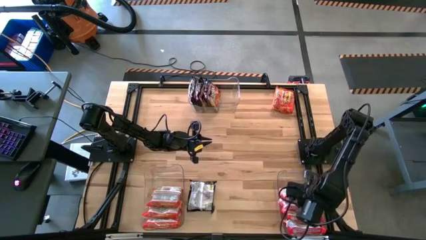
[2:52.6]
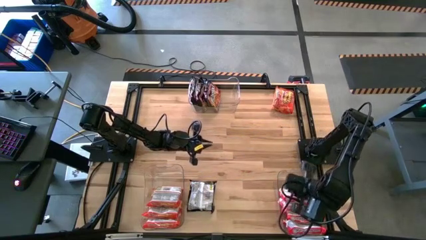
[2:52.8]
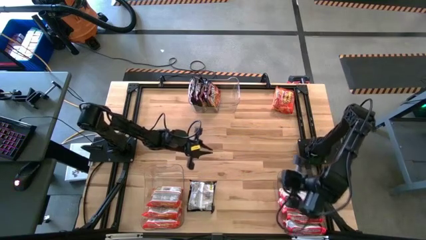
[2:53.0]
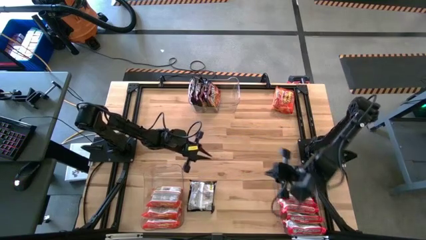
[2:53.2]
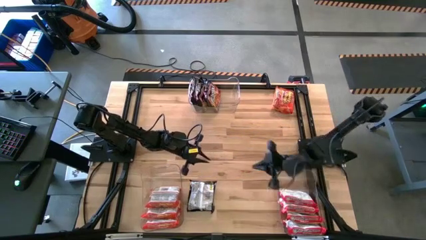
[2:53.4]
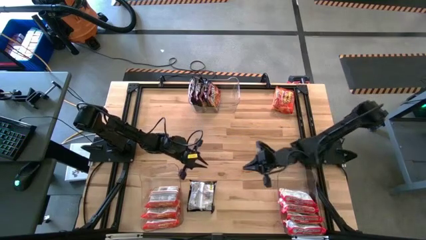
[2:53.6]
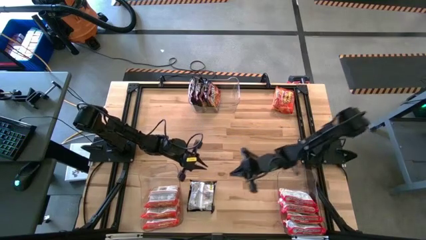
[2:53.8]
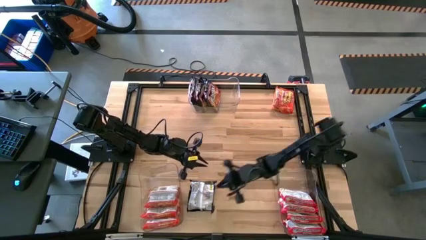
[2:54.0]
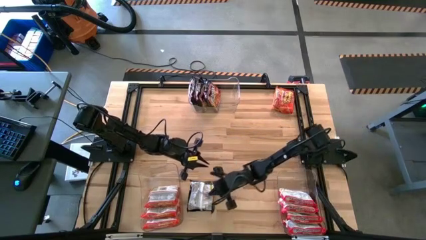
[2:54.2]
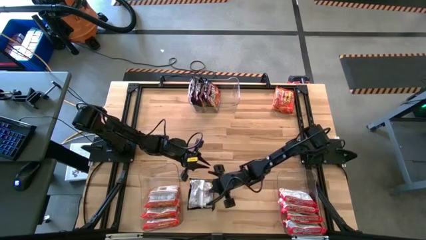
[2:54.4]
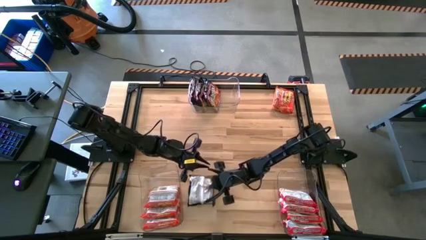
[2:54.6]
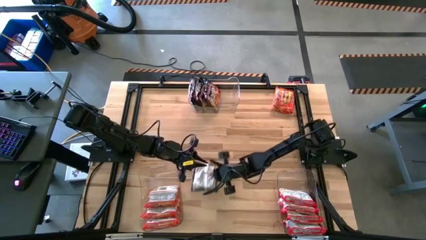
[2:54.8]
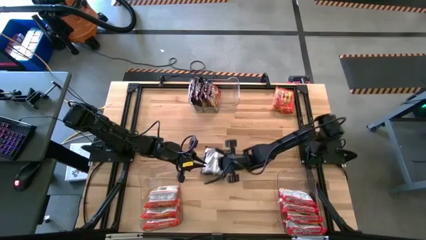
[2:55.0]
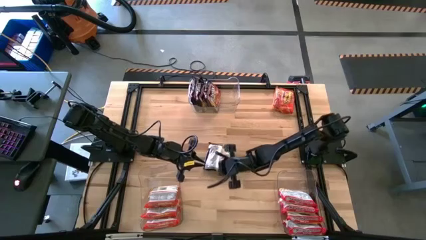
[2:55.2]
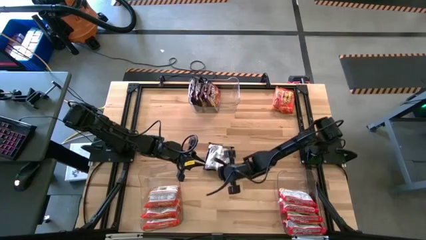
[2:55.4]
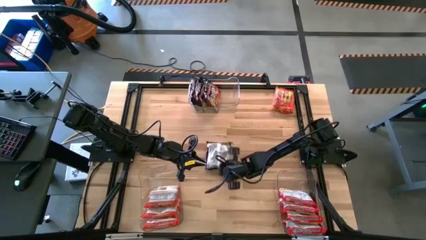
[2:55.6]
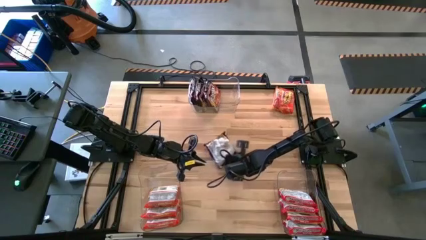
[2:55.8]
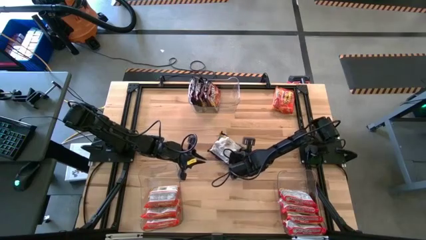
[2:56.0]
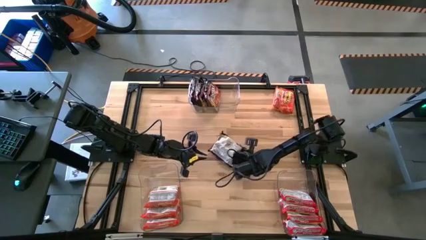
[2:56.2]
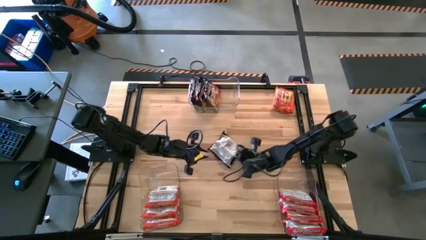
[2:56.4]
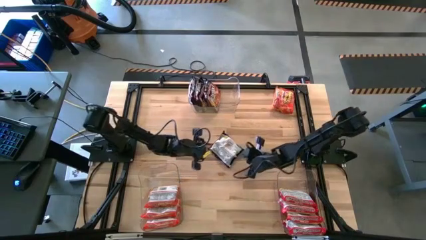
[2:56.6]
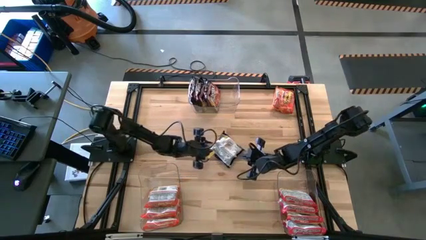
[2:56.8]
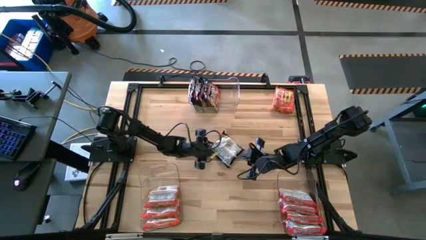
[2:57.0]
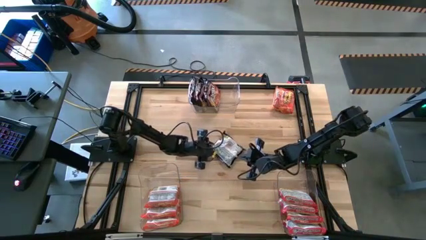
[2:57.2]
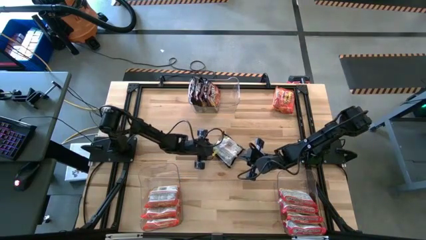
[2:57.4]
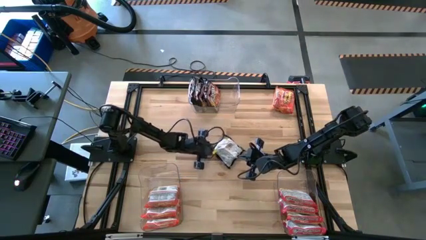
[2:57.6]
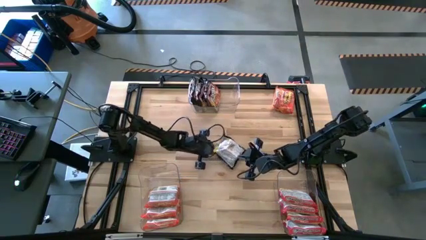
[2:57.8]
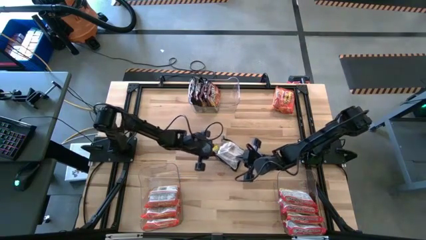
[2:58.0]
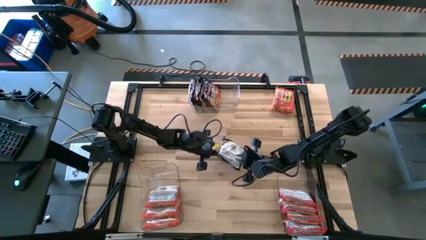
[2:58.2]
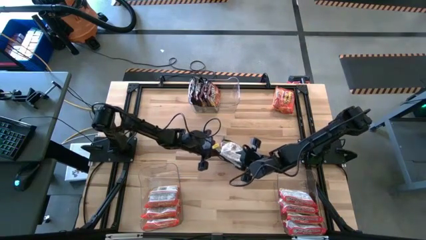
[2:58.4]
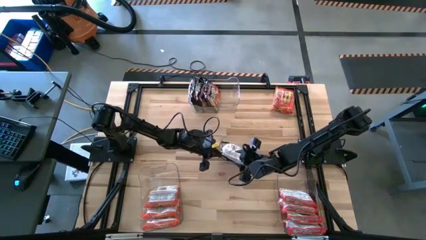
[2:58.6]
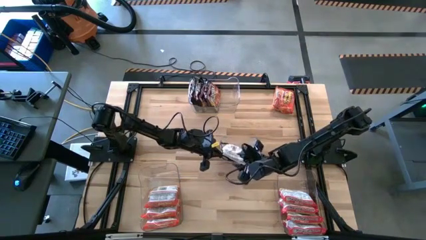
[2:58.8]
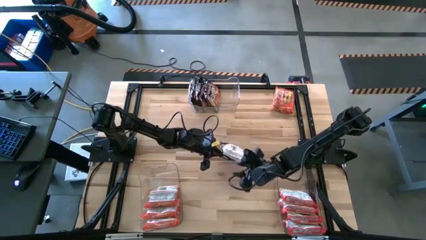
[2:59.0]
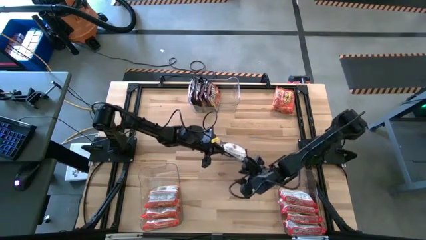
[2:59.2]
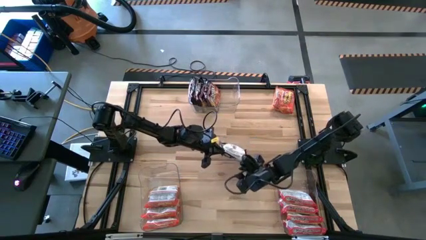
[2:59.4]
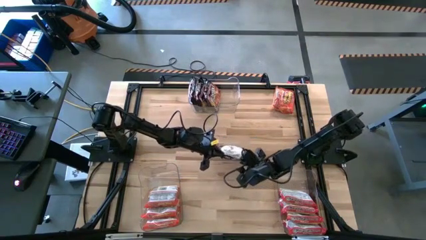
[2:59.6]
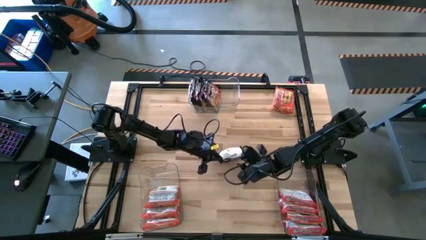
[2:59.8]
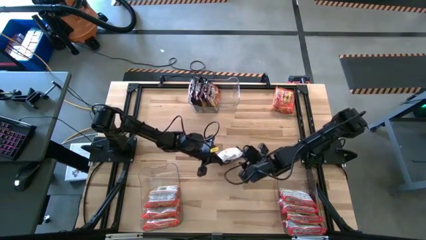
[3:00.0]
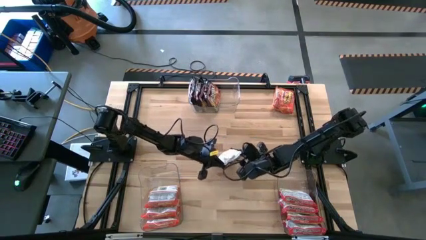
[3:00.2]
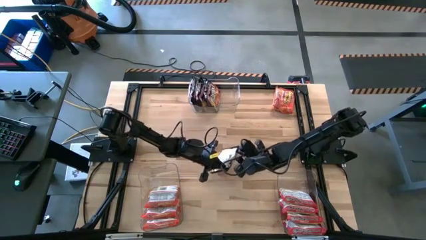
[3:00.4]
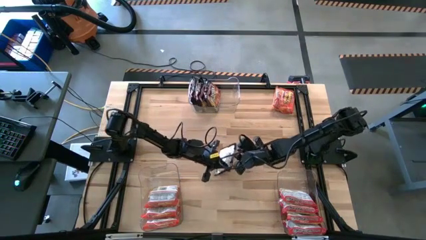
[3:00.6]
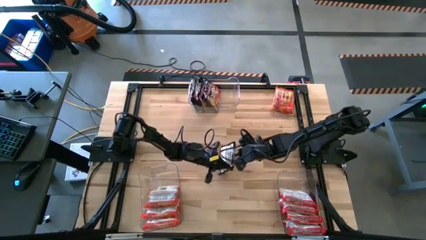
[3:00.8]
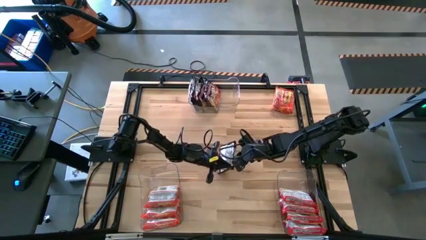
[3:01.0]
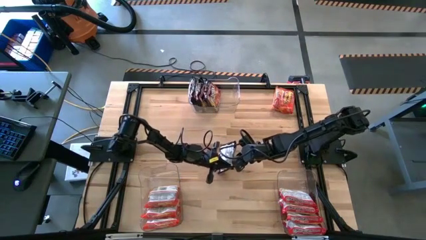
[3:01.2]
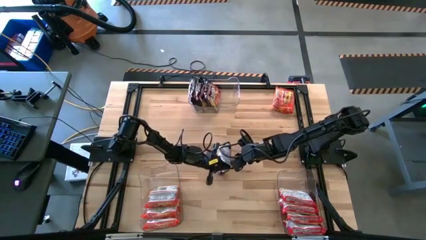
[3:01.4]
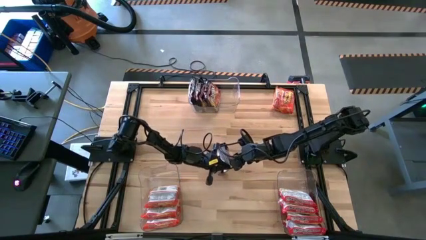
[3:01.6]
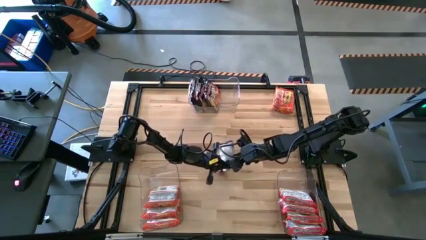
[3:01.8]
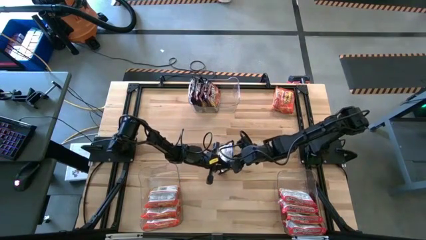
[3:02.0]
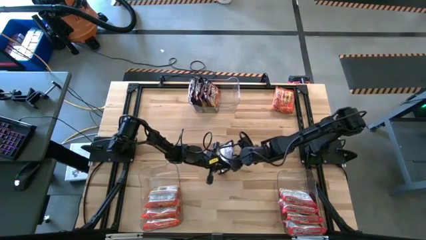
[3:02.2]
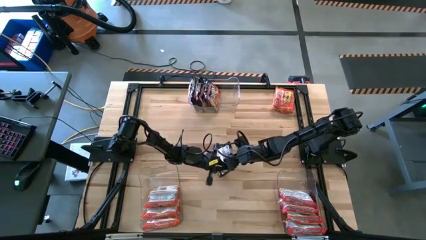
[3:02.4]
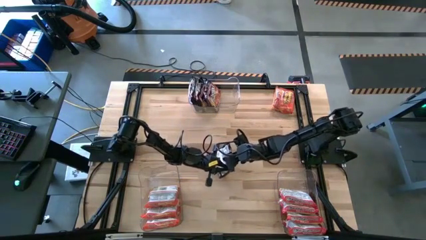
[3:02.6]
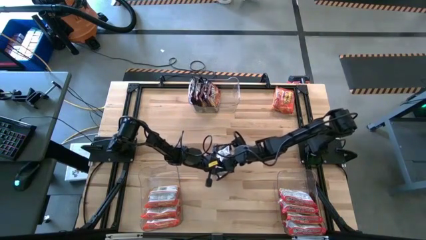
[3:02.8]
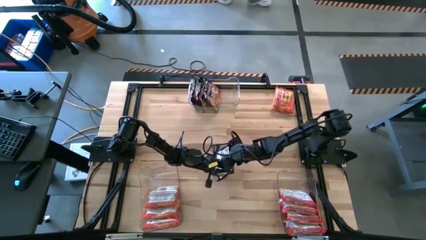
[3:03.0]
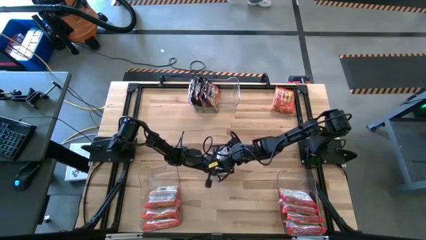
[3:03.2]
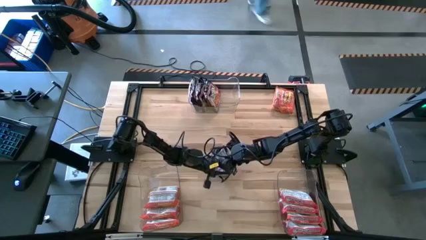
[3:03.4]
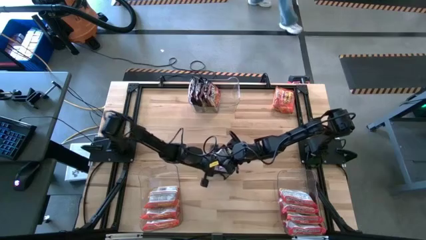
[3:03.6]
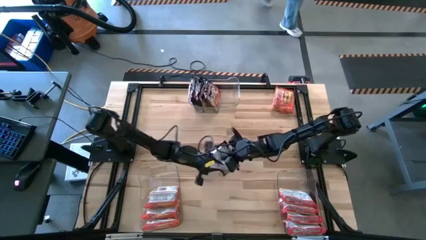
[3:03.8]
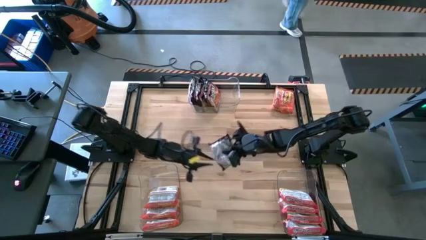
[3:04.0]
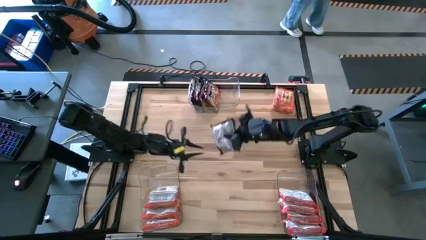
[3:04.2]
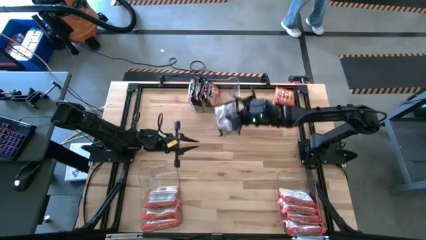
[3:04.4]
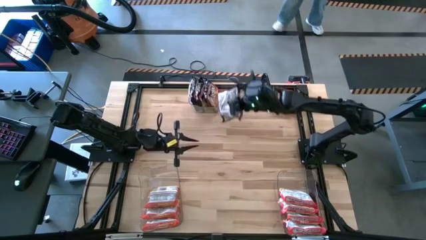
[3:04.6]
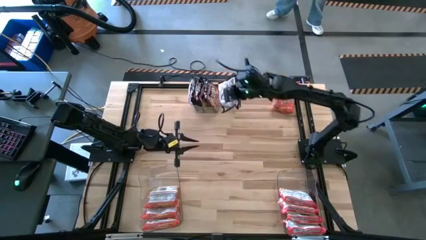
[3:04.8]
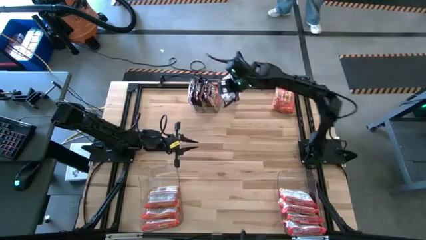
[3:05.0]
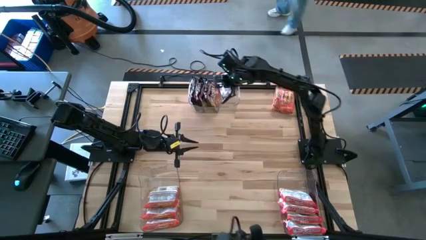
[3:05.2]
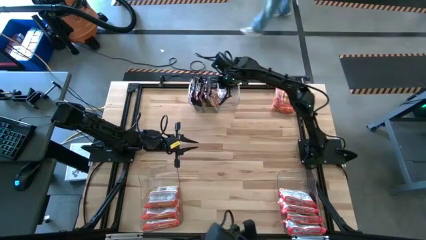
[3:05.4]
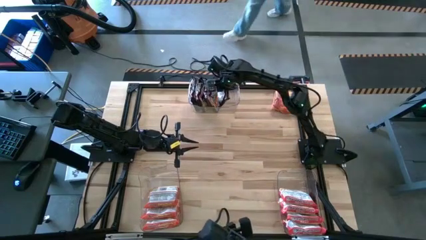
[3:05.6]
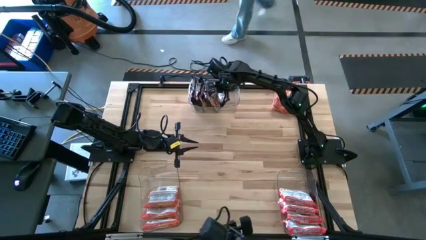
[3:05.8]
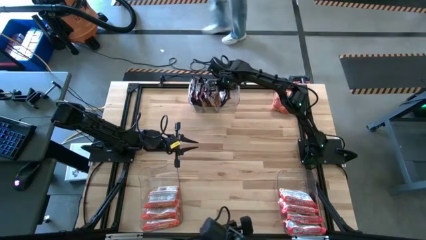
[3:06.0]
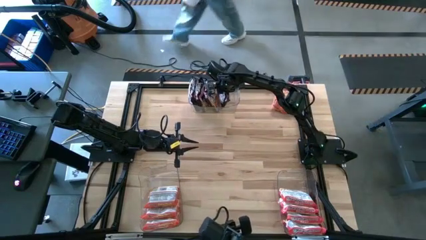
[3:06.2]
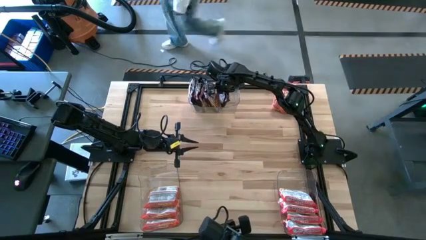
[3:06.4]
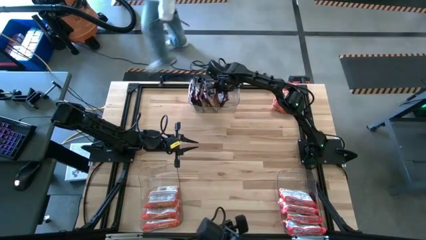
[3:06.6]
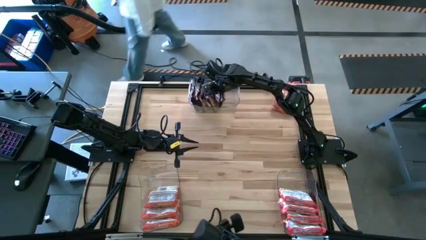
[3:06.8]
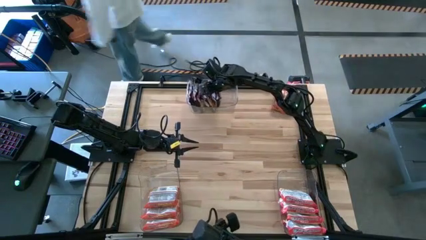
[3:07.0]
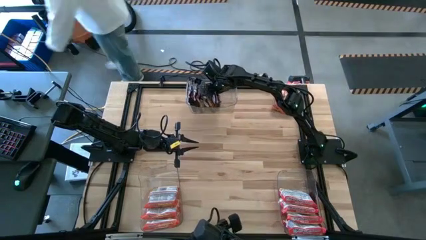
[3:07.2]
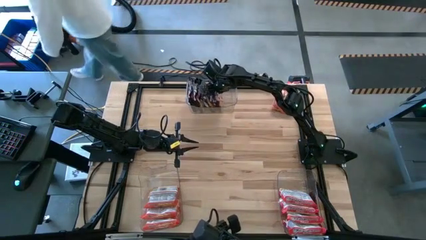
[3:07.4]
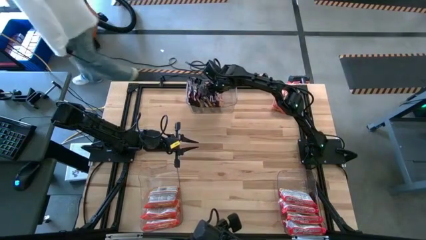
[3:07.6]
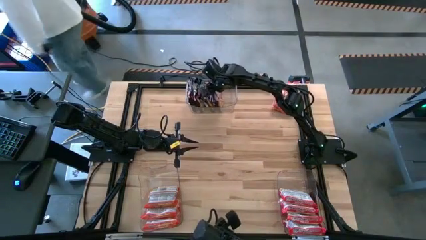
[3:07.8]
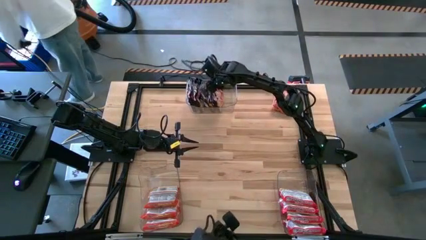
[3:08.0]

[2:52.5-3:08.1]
Task: Sort Maruchan noodles
Put the black noodle pack into the top transparent bin
